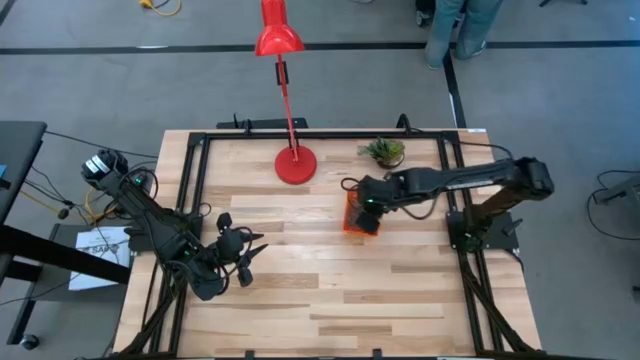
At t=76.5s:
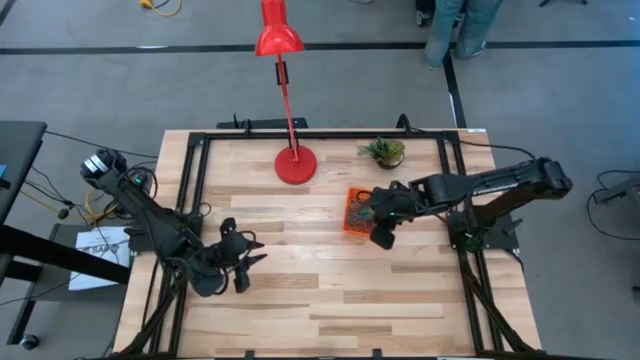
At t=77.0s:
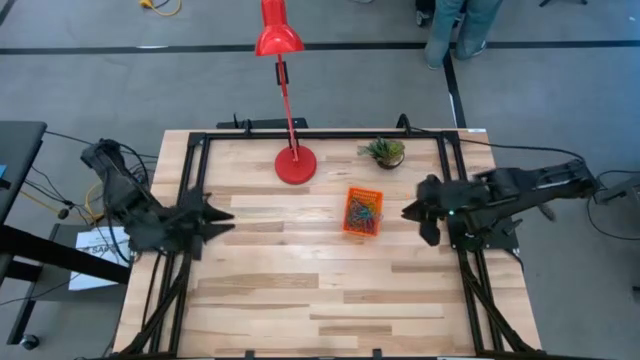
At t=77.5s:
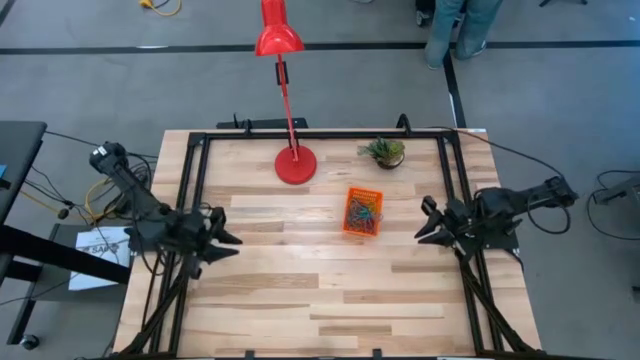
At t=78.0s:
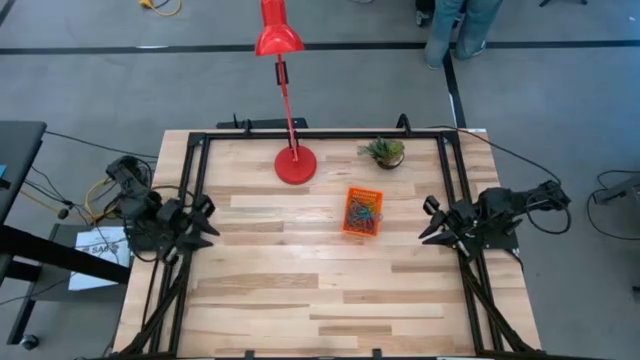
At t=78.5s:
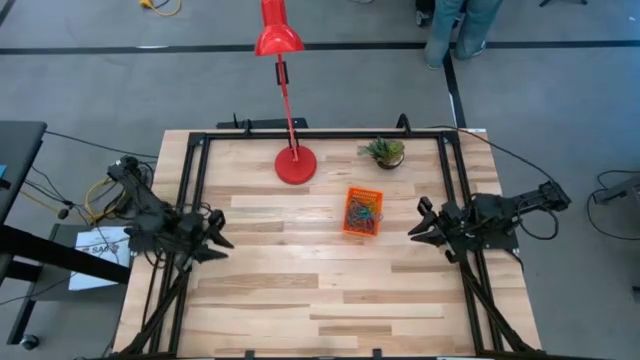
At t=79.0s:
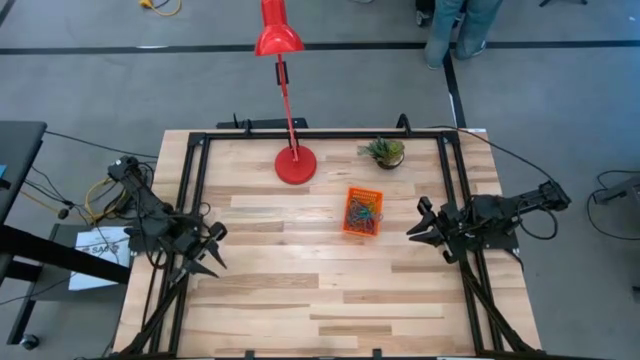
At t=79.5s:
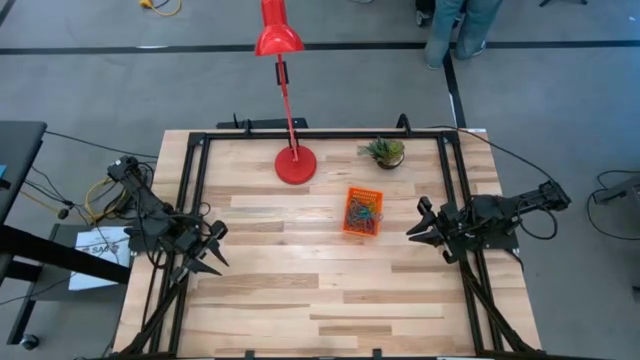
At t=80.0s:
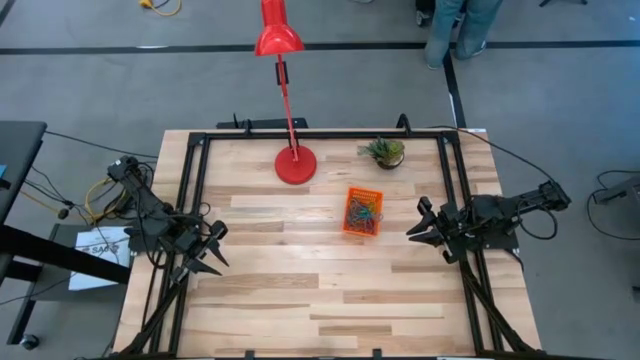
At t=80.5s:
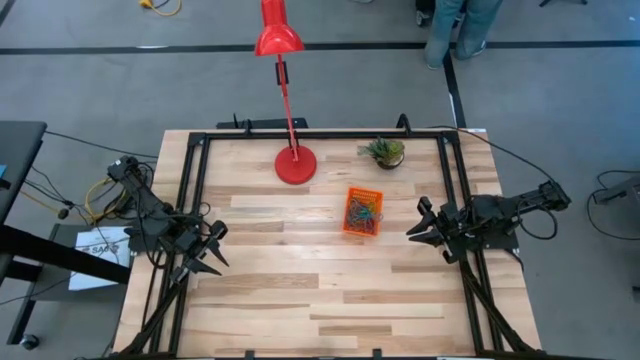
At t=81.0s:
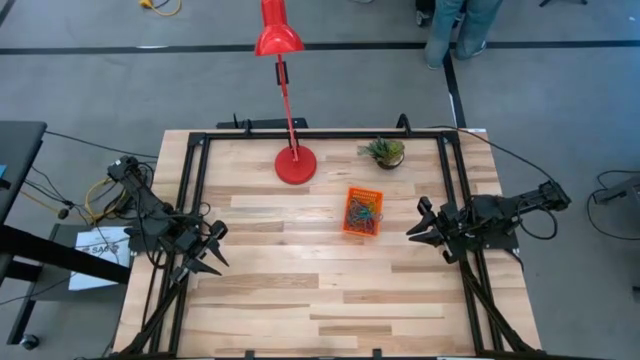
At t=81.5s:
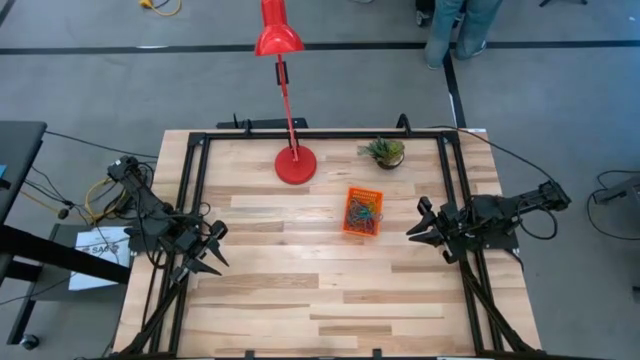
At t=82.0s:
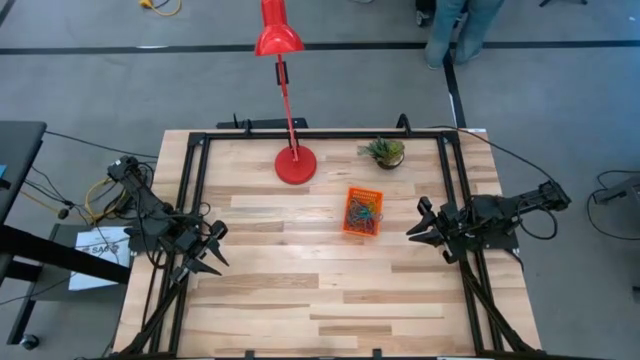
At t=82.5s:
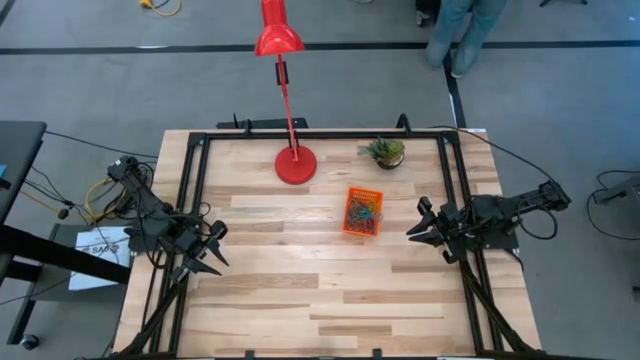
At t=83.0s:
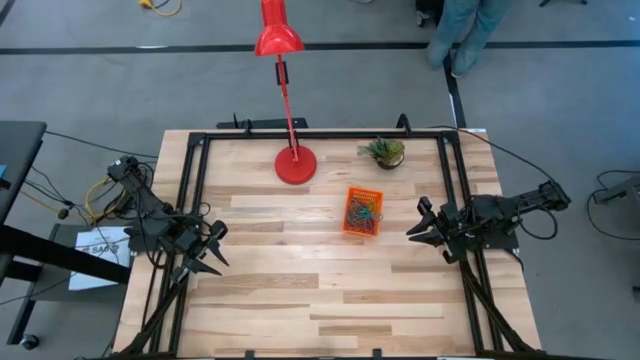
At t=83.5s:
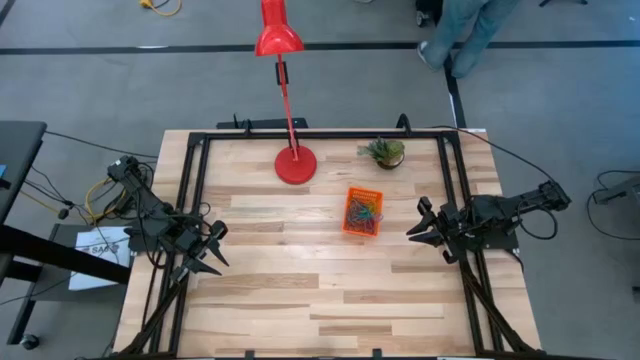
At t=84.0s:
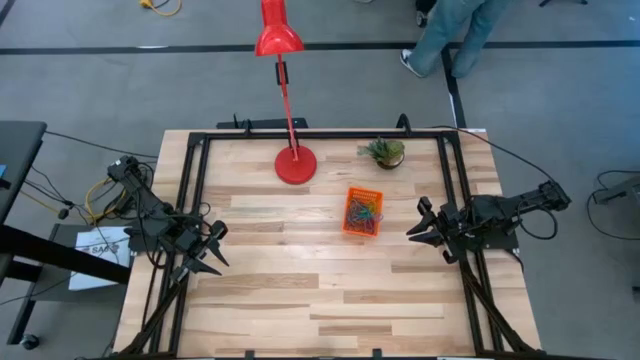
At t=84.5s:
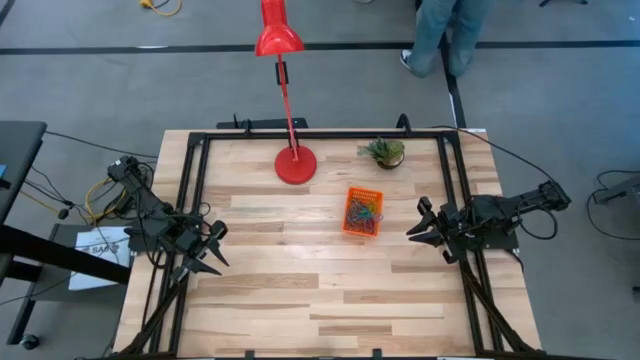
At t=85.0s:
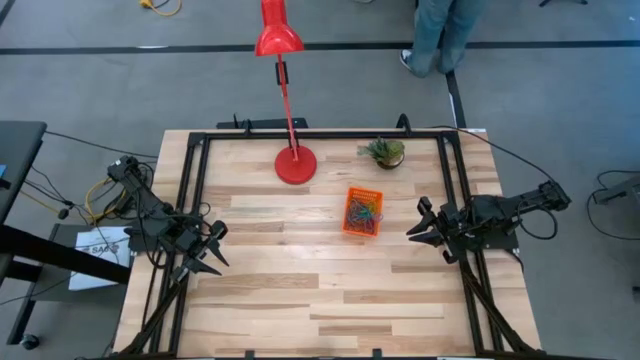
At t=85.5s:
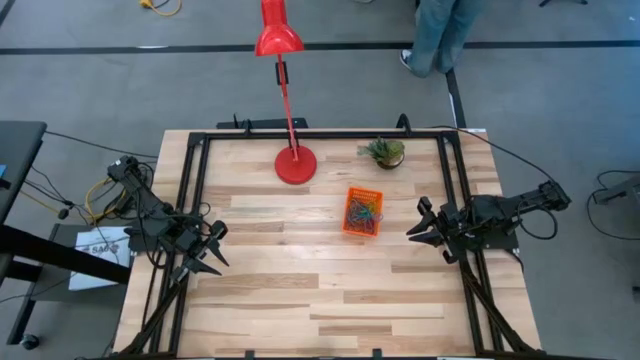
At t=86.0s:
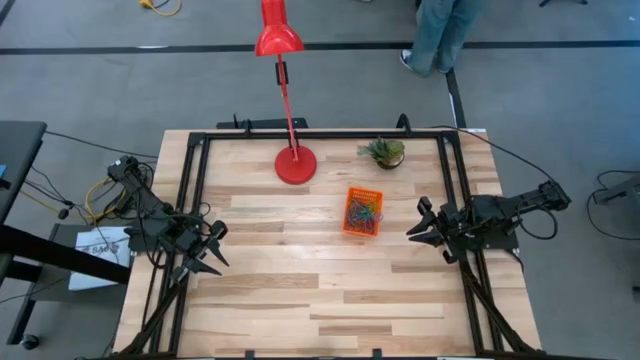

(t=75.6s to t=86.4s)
Task: Pick and place items into bin
Return to Home Position

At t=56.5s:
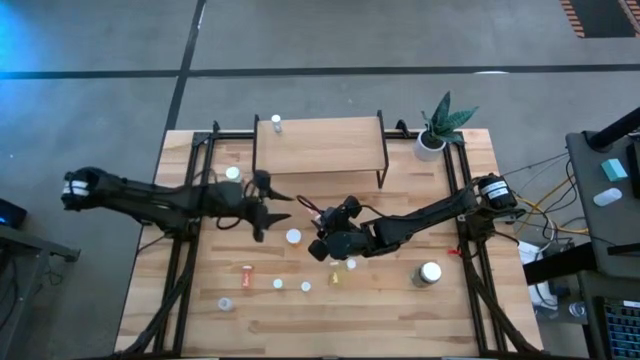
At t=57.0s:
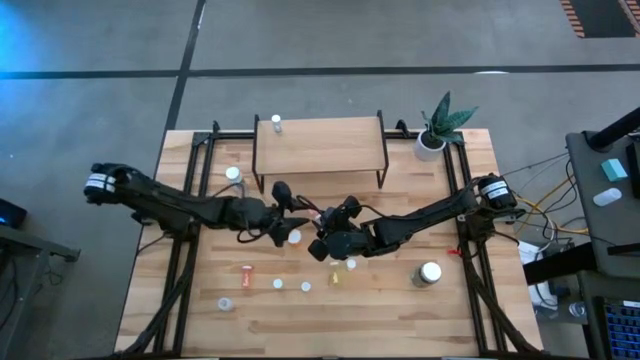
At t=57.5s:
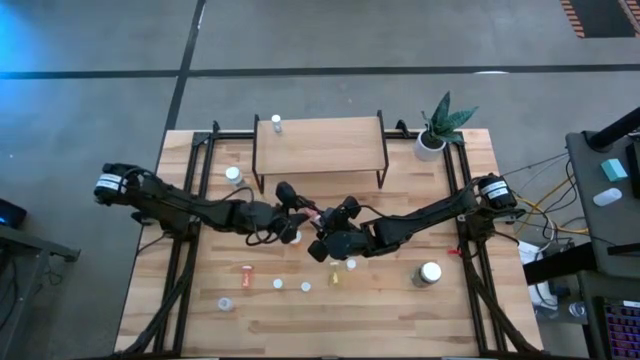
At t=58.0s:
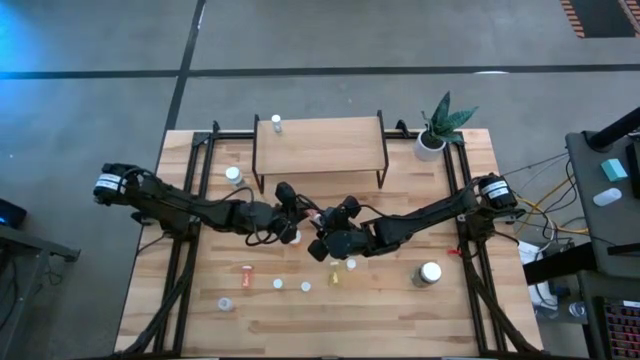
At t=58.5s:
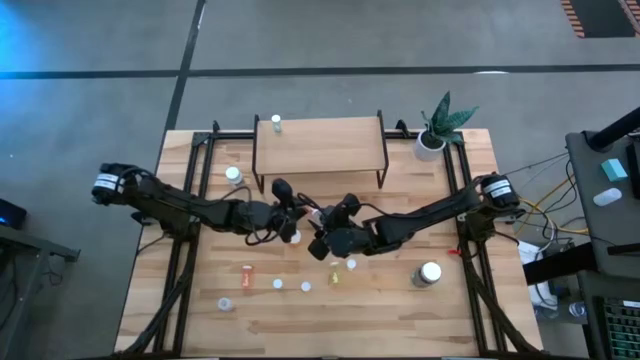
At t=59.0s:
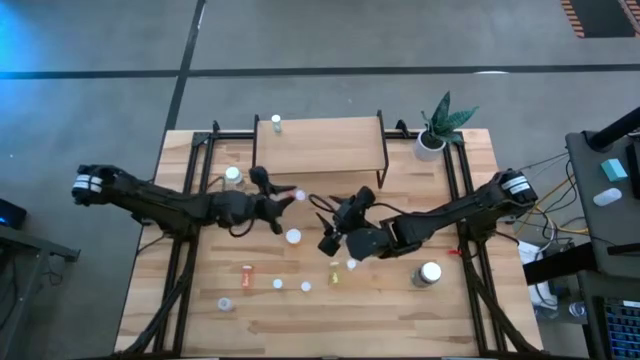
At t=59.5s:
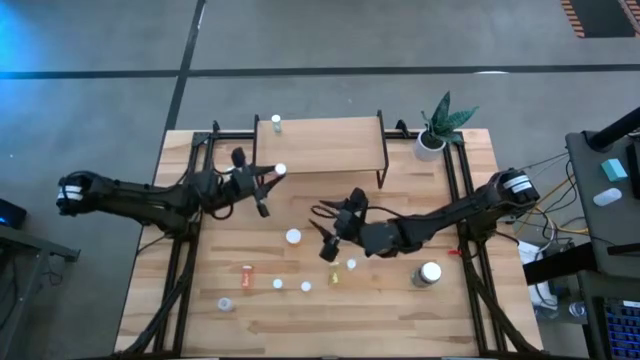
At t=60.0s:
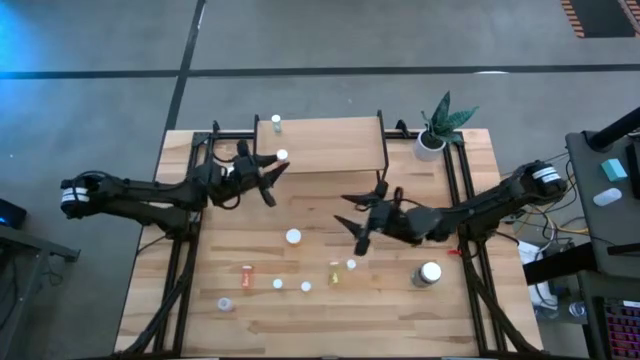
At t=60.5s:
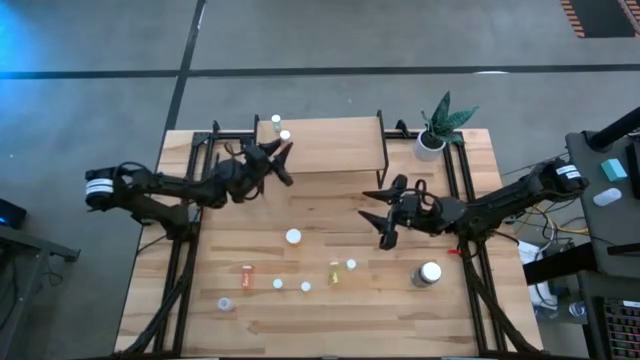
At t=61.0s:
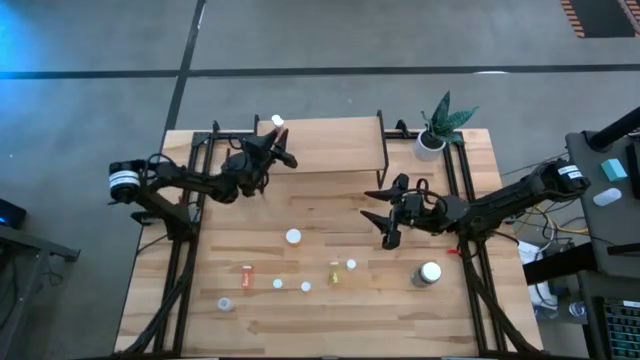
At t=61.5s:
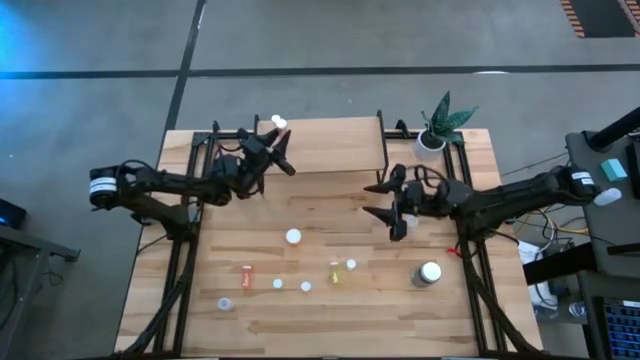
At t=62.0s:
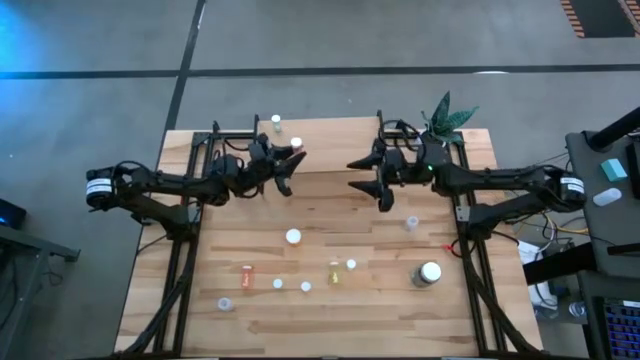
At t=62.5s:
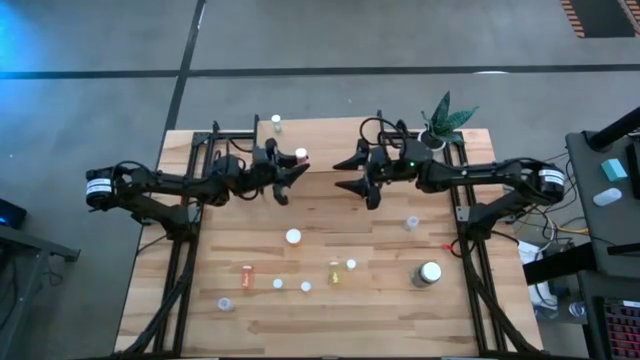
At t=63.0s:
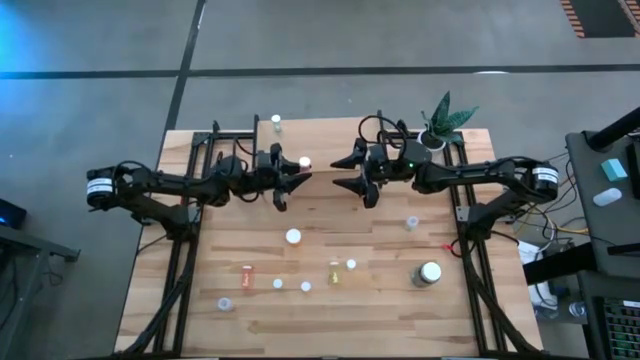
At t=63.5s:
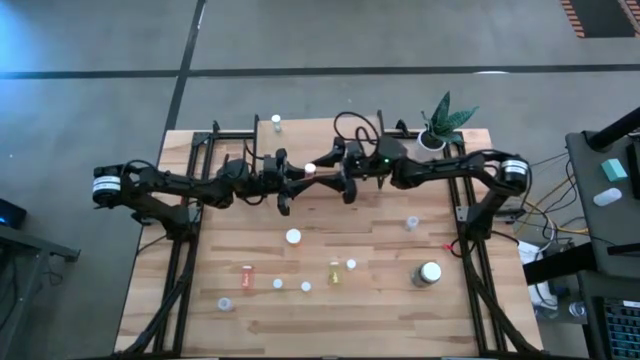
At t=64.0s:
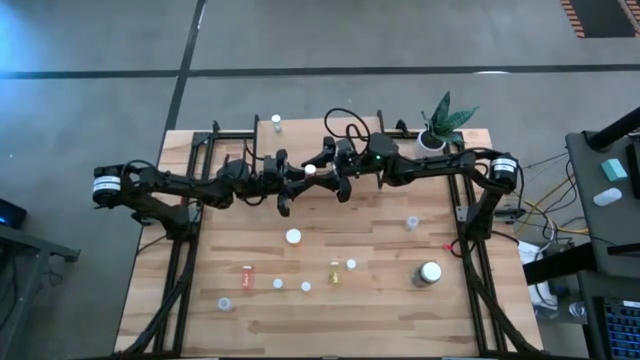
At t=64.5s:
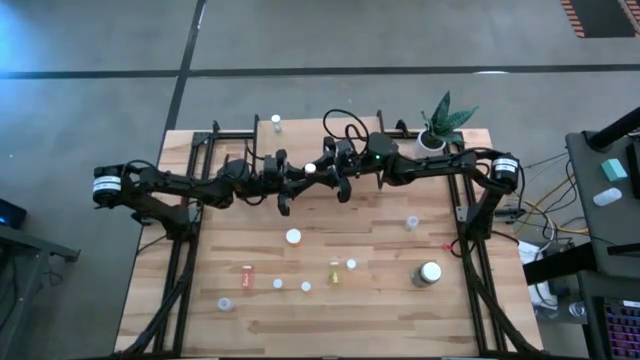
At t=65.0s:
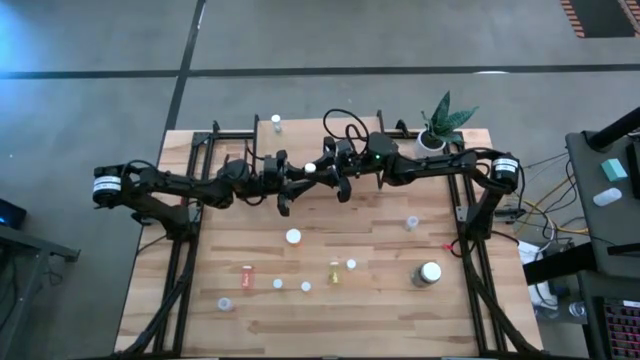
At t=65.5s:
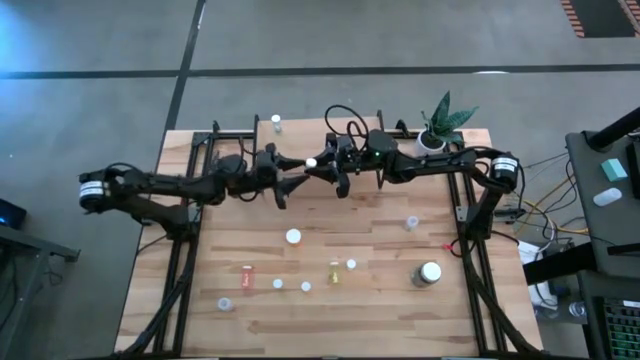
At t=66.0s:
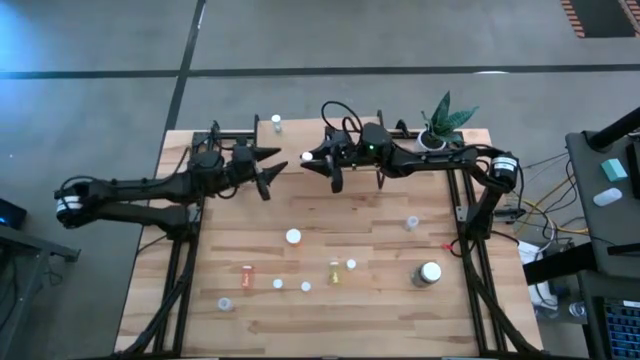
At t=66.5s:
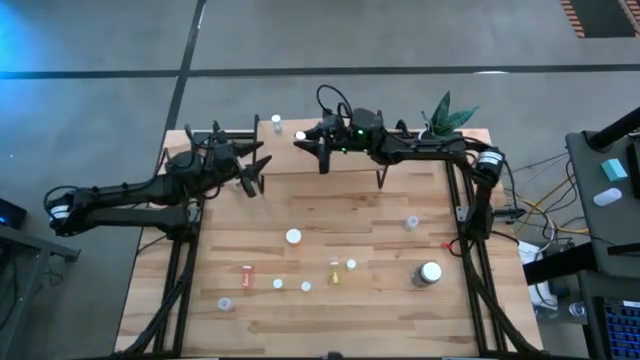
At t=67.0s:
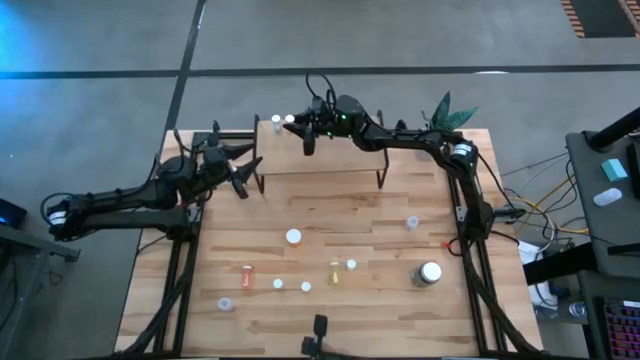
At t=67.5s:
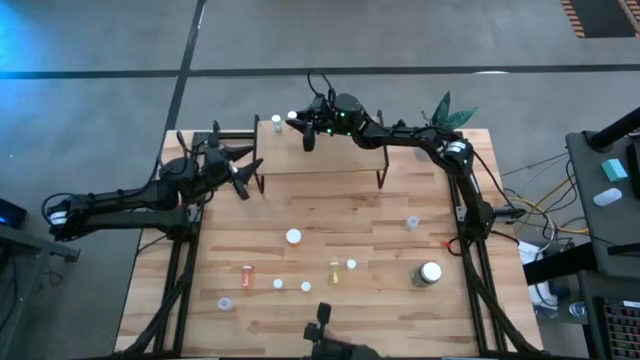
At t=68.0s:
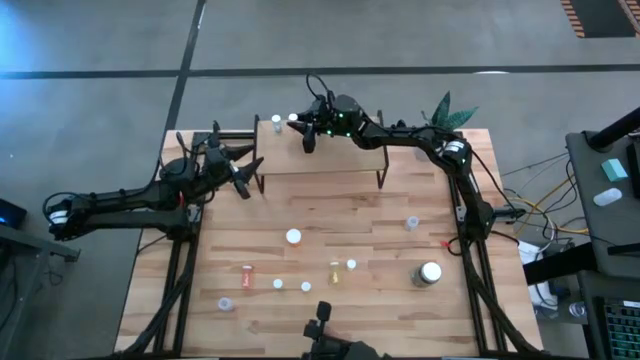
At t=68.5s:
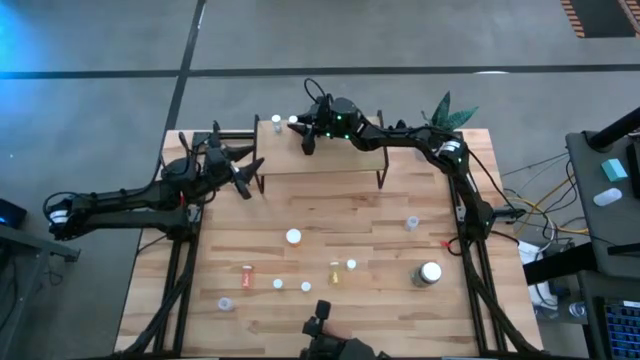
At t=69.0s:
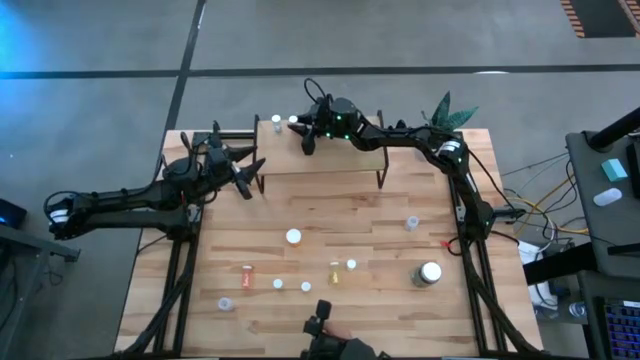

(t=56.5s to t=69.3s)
Task: Pick and place medicine bottles onto shelf by color
Put the right pink medicine bottle on the shelf
